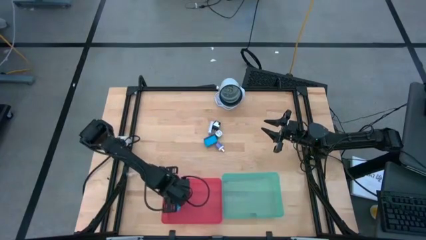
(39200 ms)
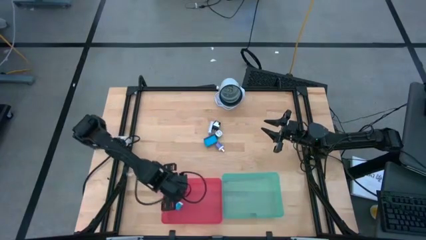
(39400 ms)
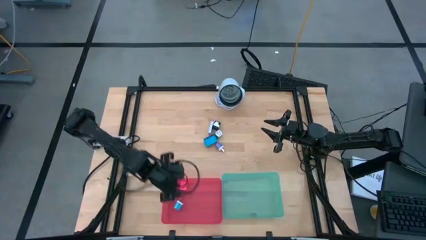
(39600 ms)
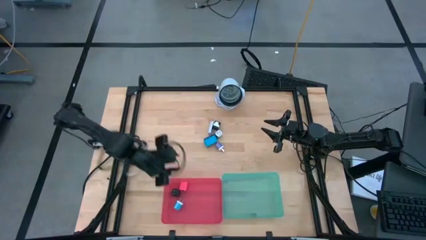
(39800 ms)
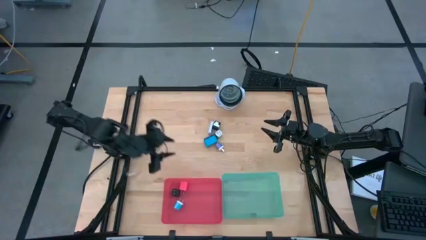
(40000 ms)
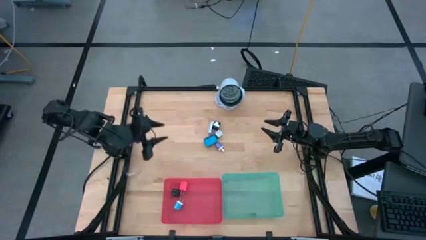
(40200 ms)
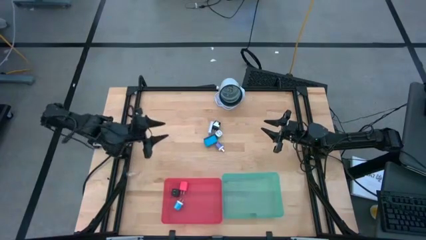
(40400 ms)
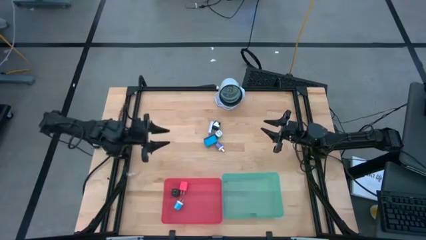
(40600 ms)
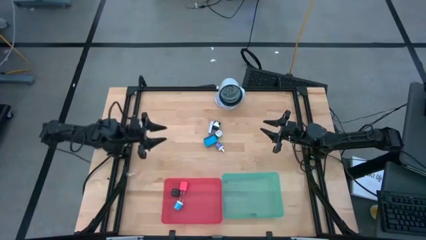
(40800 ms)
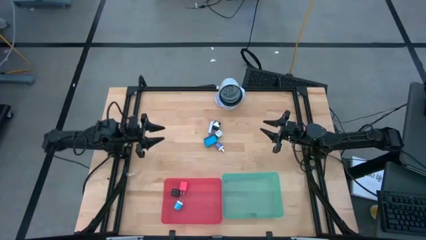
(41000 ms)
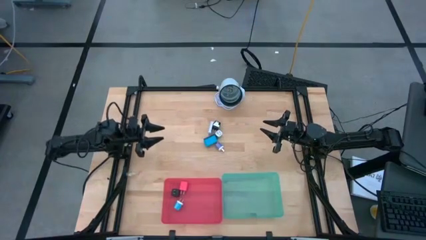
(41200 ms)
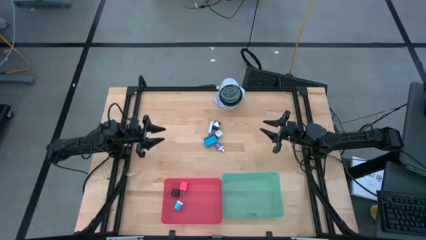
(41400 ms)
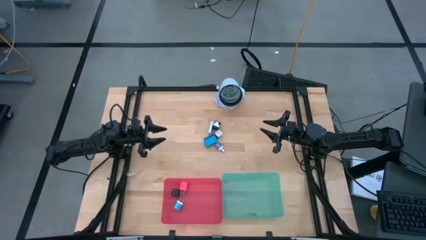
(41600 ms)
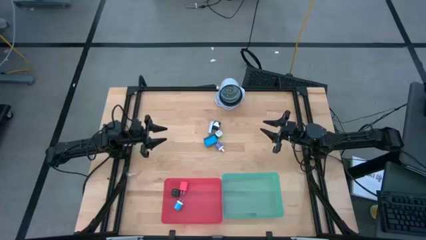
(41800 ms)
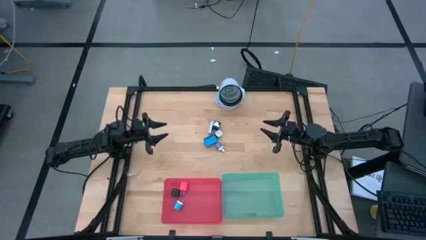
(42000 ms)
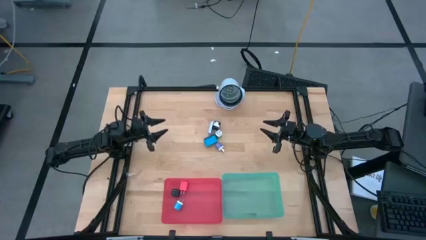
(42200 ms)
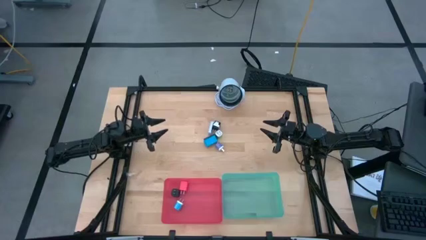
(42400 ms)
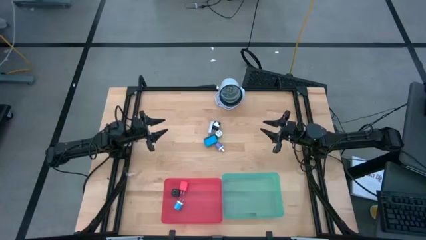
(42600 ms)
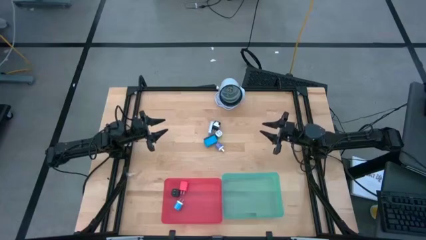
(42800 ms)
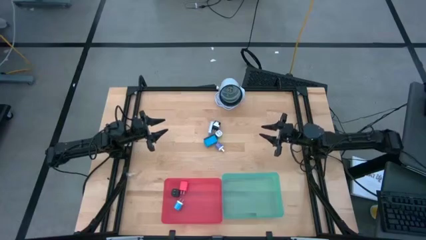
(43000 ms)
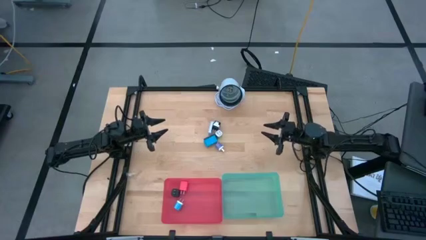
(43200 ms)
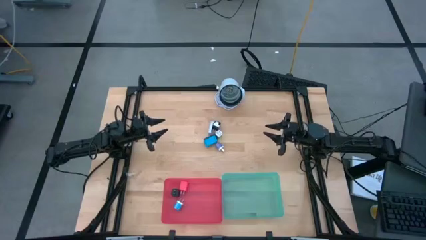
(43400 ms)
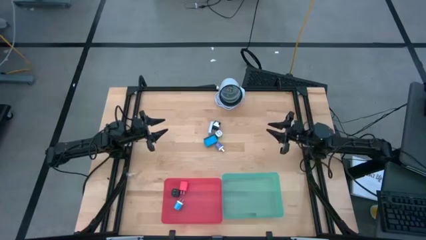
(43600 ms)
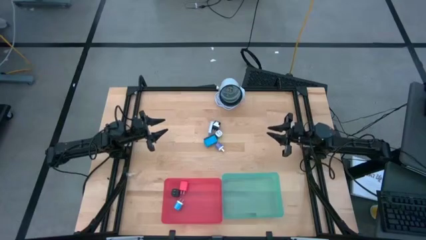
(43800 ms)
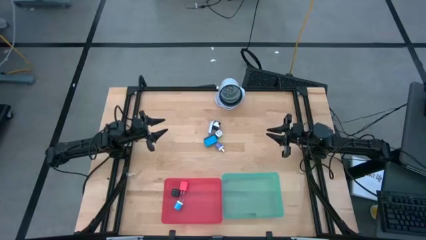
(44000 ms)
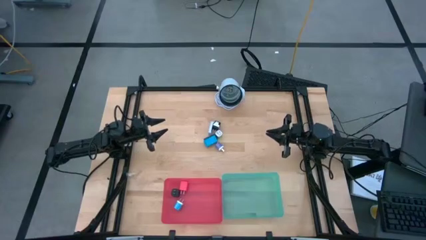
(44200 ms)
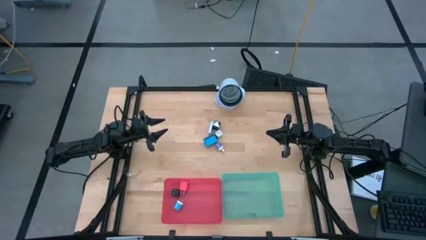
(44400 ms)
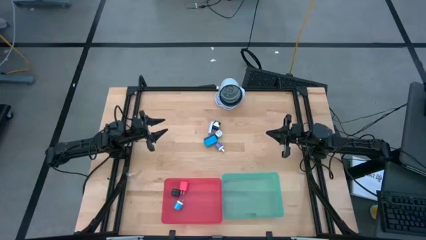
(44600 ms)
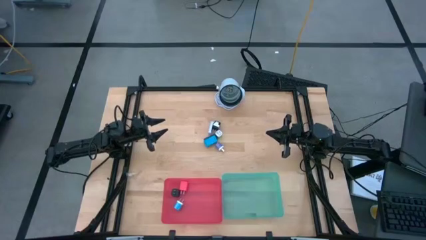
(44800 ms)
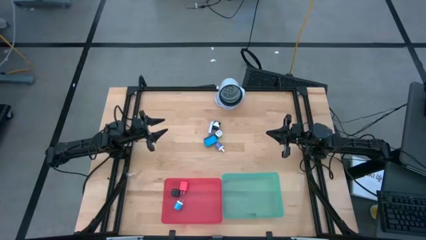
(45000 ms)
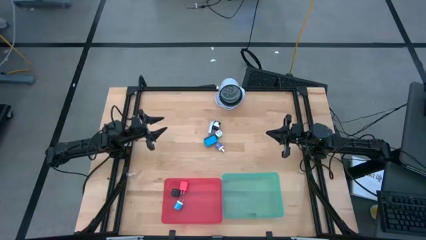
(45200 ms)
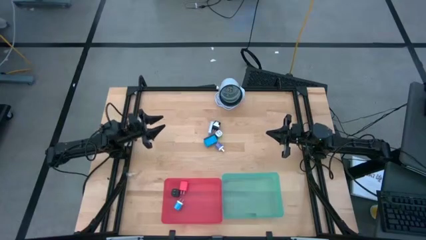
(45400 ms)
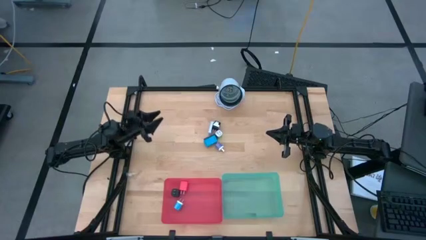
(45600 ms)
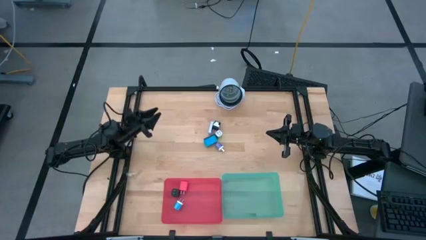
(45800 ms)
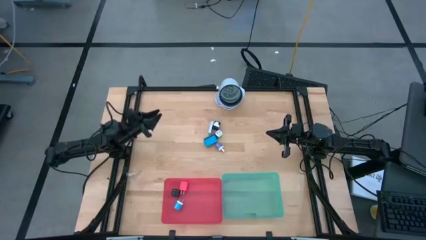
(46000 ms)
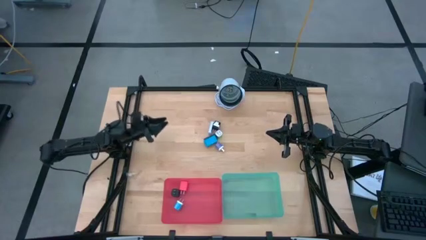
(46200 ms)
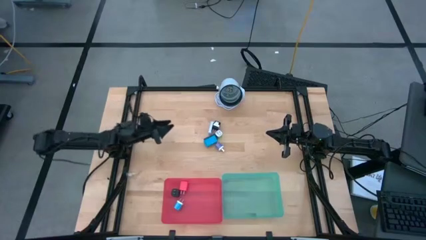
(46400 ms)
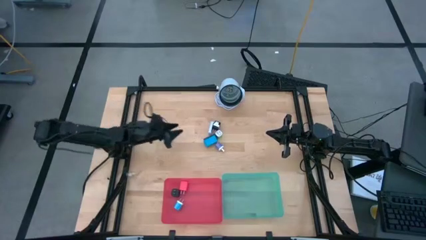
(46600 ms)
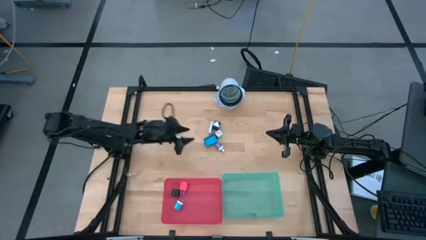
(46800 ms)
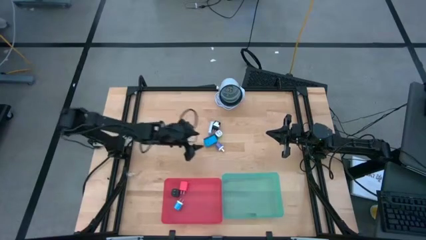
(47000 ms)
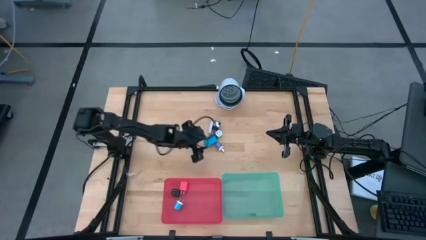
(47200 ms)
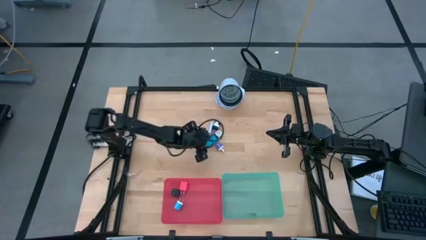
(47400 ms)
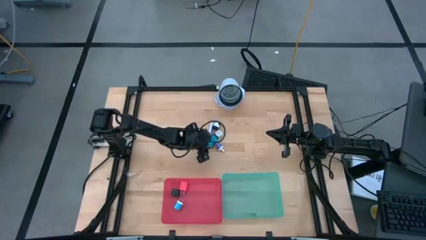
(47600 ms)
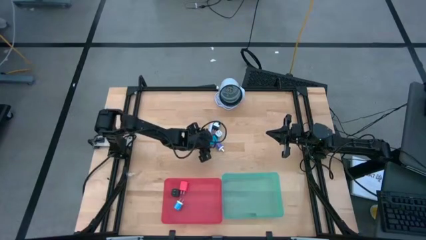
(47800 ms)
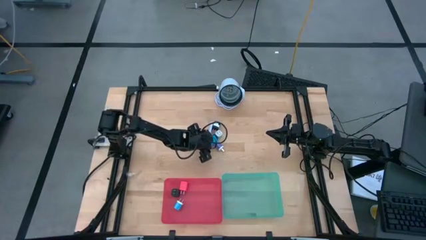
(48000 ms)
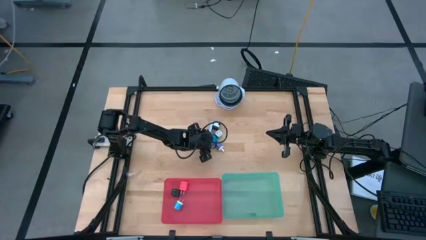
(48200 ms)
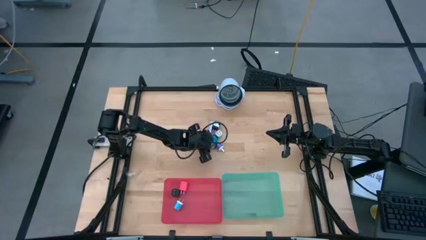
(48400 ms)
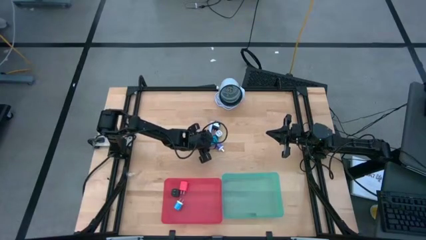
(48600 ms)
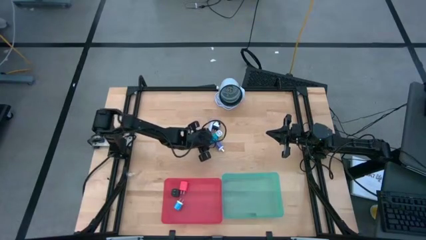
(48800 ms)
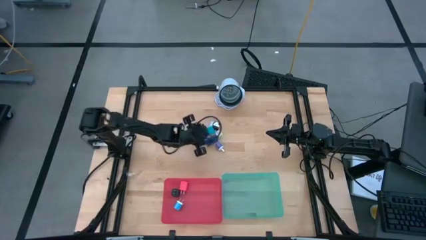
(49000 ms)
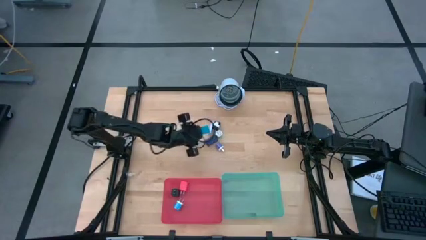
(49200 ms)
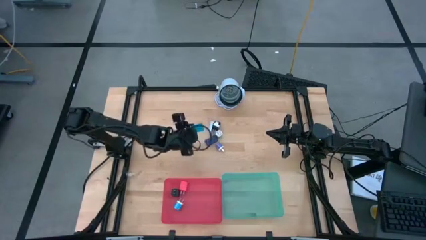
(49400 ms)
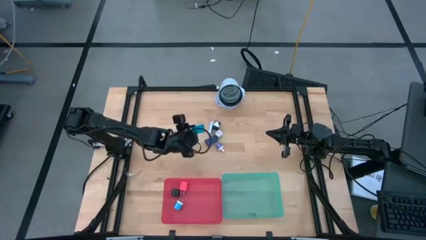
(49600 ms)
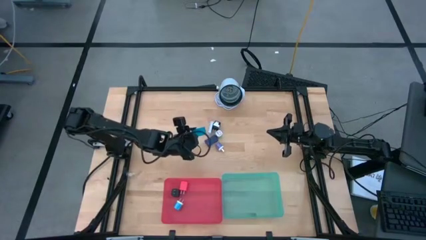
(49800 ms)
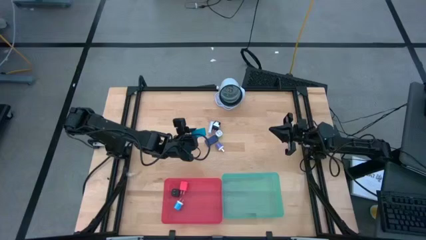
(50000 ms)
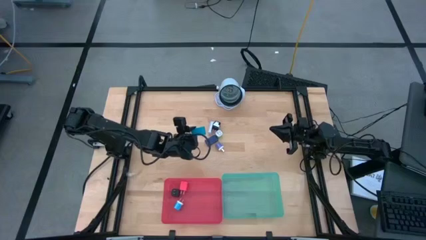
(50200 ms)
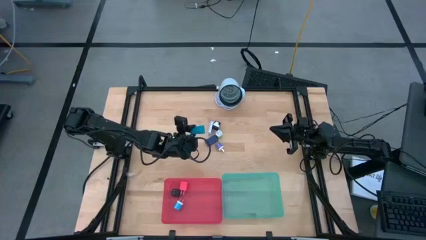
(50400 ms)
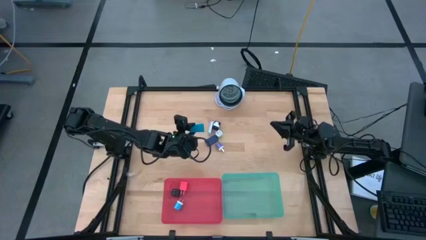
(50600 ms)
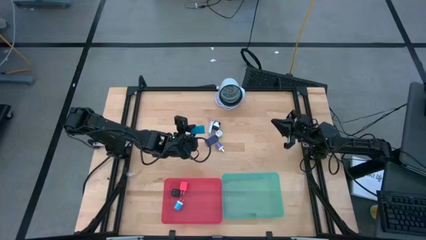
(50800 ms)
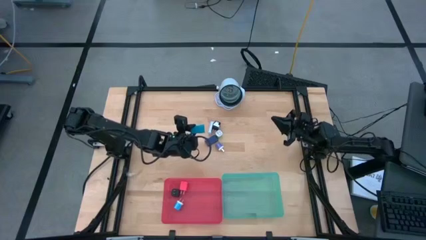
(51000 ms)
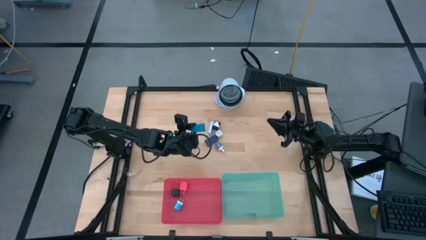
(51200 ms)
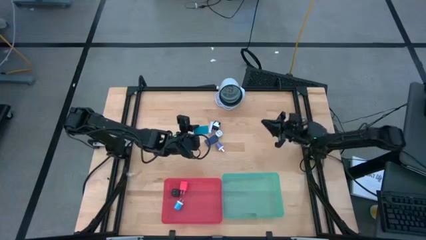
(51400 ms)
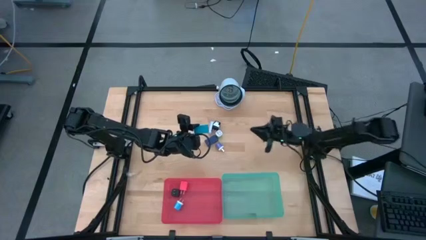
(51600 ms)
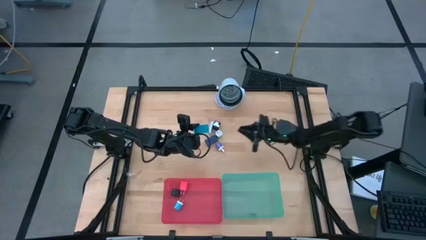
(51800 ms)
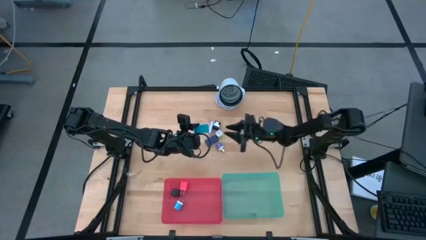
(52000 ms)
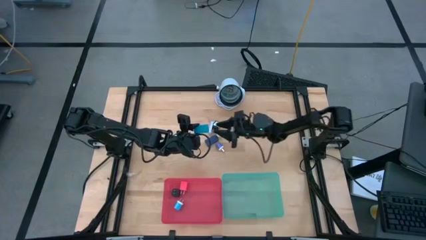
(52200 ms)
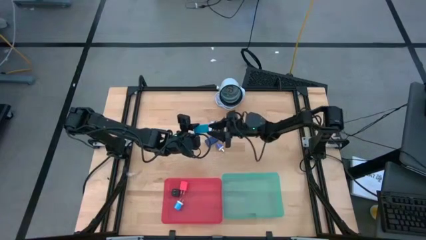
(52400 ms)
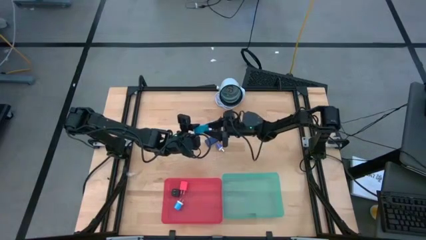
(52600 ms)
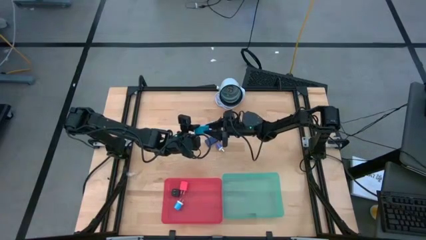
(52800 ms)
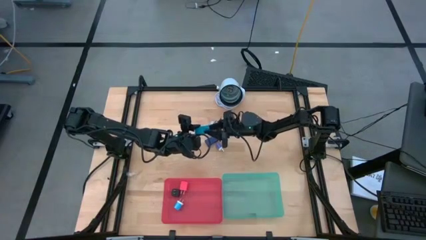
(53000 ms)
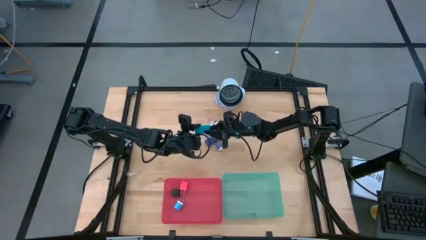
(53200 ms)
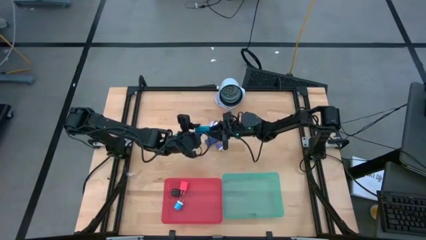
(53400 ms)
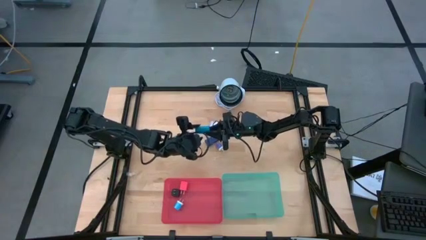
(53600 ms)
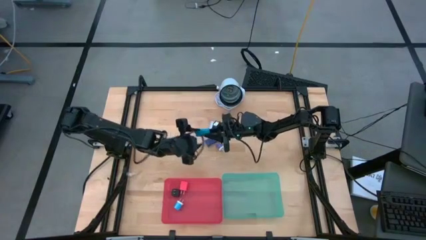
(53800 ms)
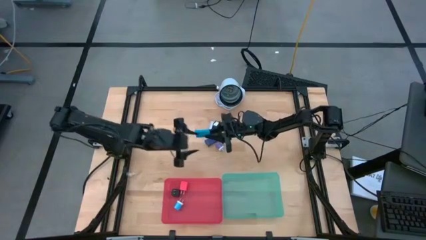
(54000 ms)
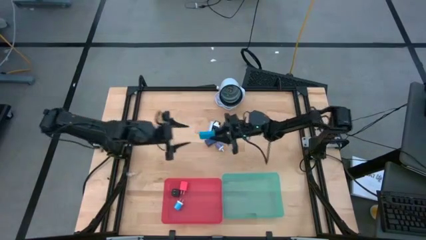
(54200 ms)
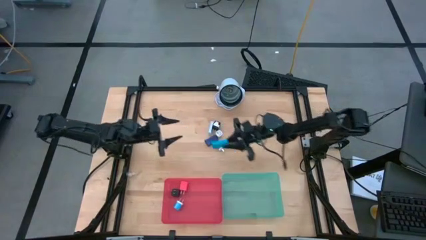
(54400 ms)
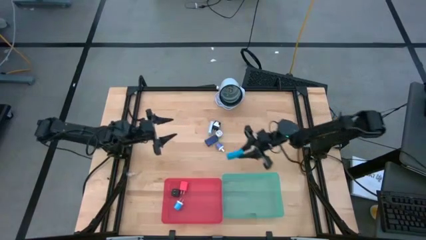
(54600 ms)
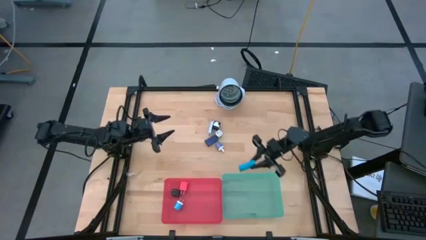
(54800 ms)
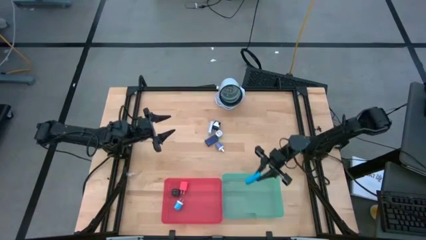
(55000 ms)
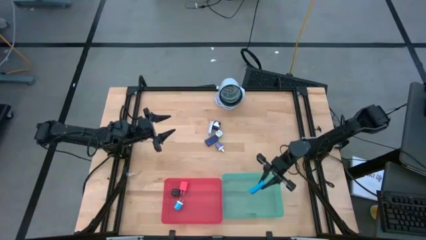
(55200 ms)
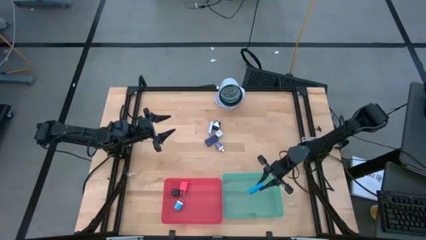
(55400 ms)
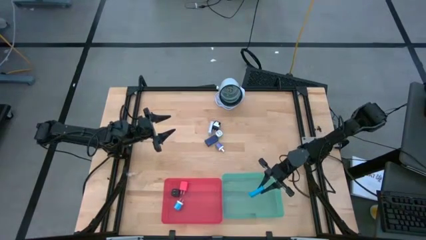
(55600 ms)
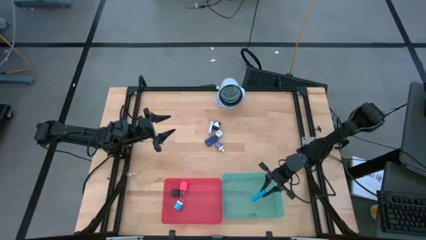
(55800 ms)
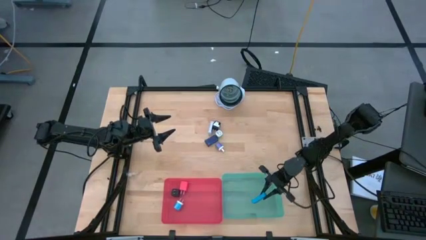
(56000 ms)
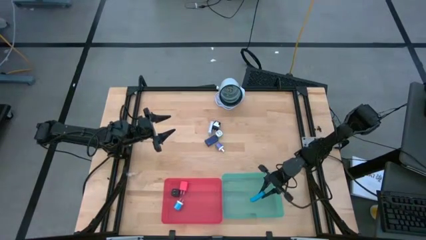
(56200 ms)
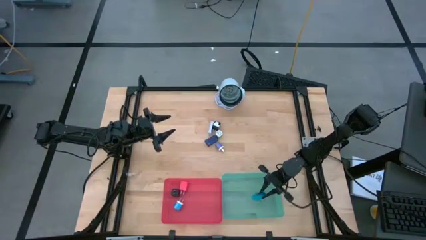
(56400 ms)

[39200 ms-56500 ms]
Task: Pick & Place Office items
Put the blue digital clock into the blue bin
